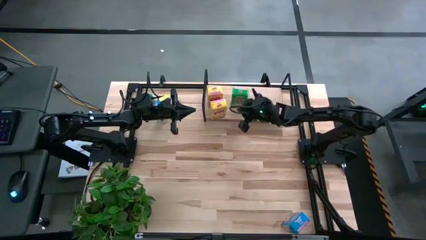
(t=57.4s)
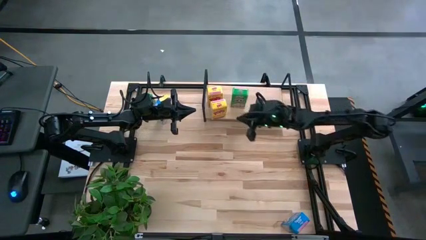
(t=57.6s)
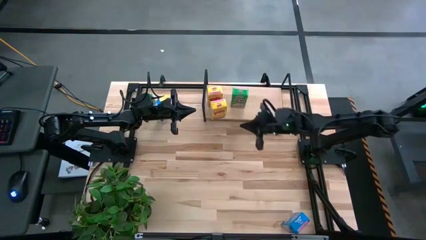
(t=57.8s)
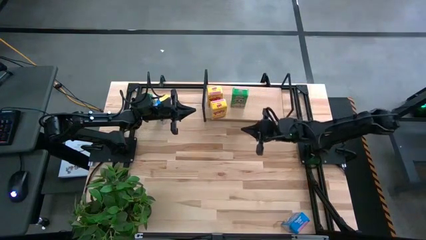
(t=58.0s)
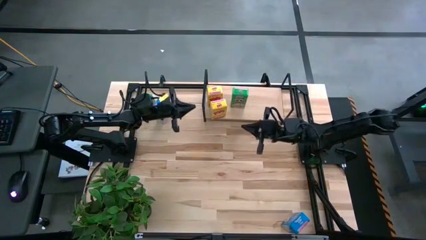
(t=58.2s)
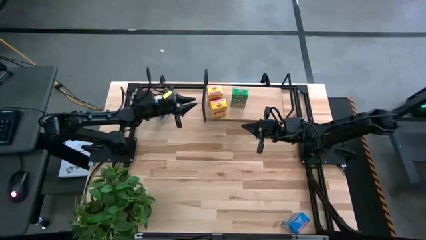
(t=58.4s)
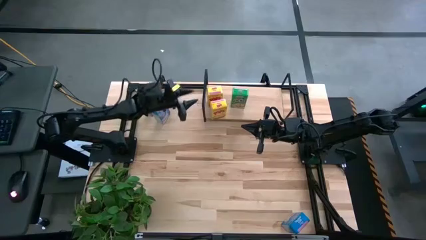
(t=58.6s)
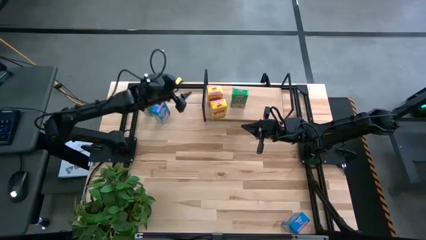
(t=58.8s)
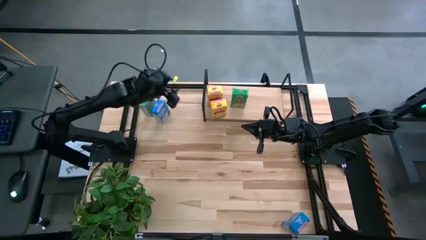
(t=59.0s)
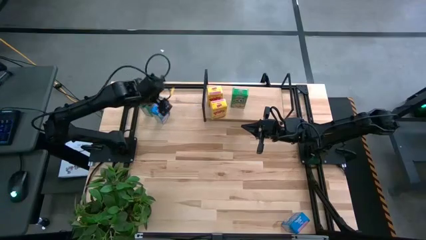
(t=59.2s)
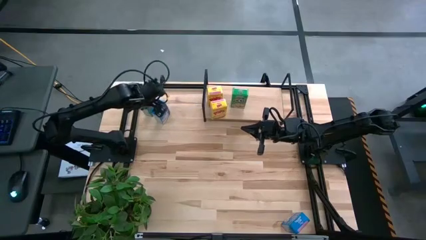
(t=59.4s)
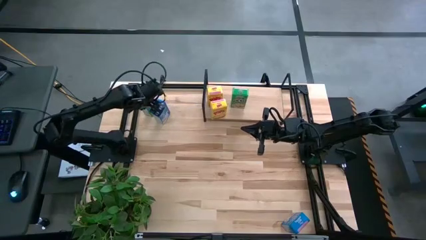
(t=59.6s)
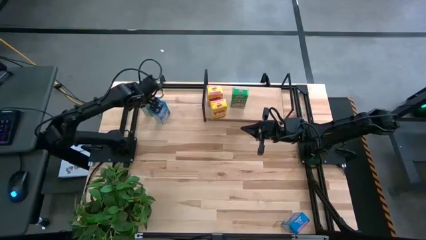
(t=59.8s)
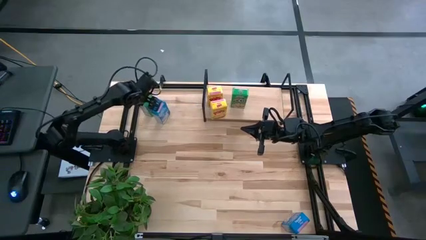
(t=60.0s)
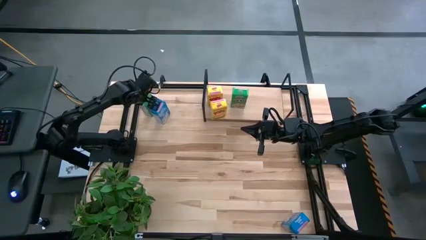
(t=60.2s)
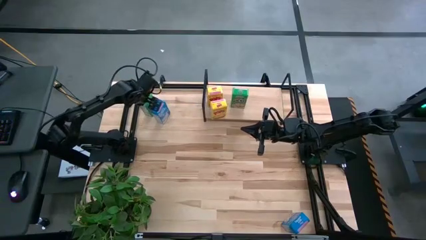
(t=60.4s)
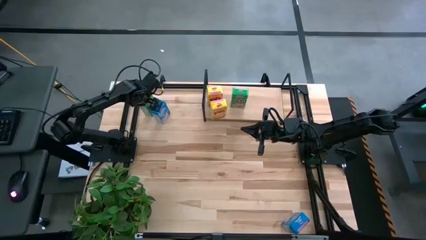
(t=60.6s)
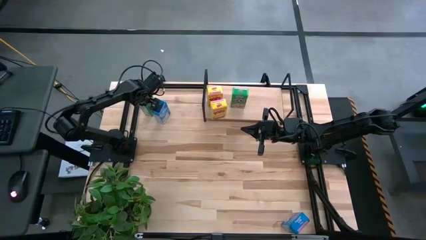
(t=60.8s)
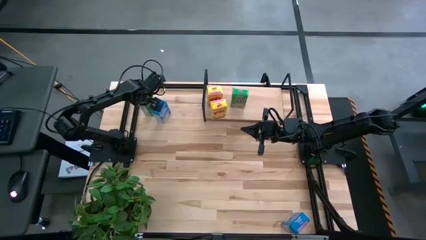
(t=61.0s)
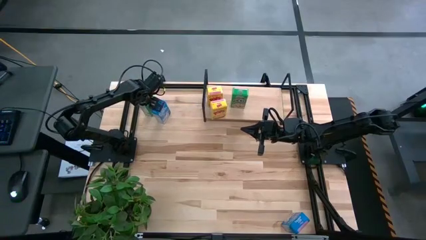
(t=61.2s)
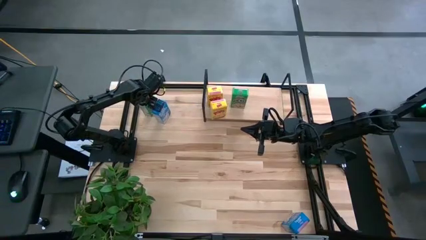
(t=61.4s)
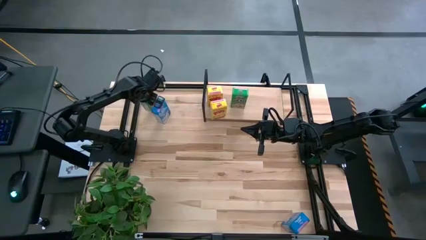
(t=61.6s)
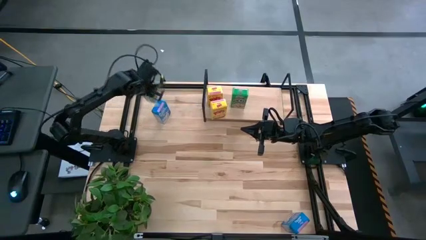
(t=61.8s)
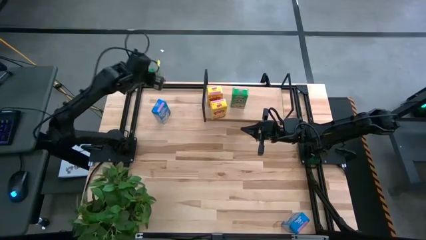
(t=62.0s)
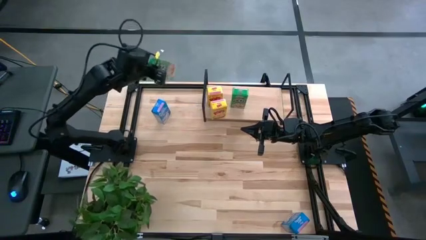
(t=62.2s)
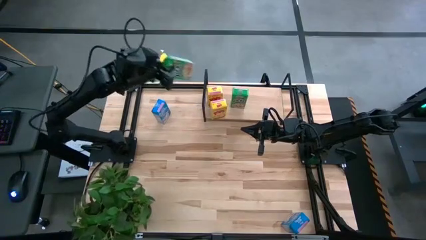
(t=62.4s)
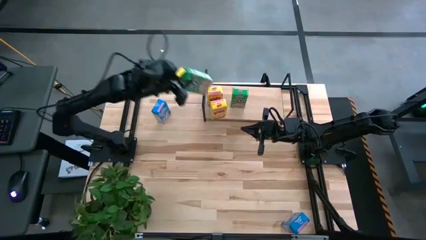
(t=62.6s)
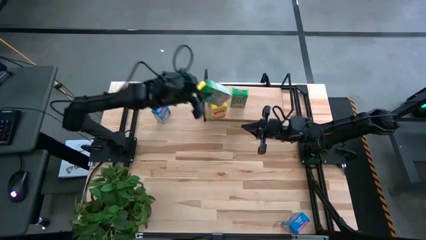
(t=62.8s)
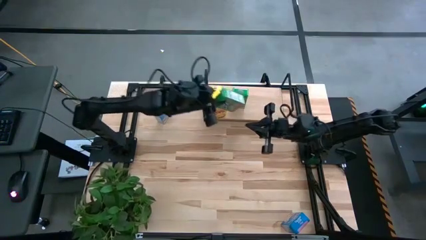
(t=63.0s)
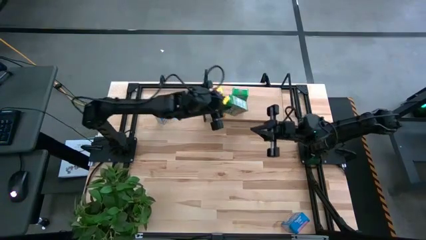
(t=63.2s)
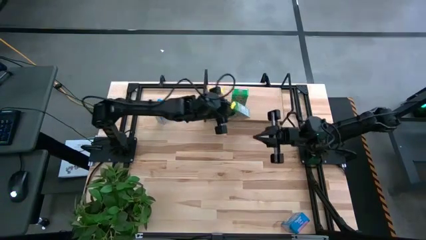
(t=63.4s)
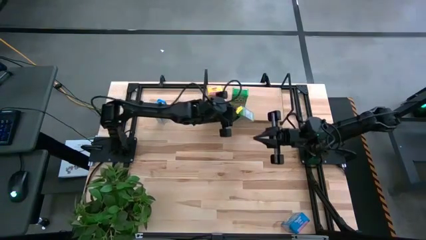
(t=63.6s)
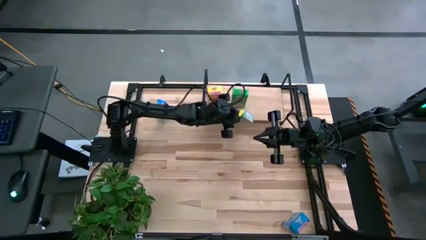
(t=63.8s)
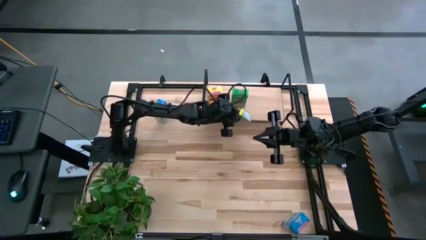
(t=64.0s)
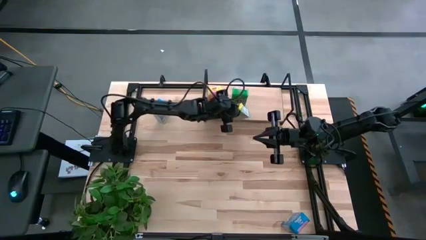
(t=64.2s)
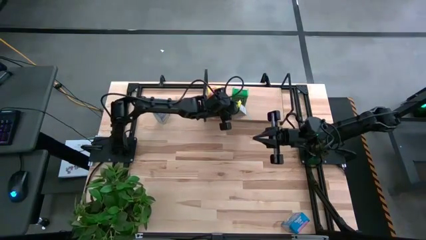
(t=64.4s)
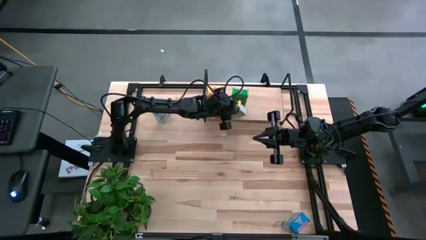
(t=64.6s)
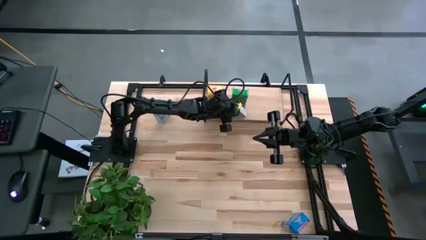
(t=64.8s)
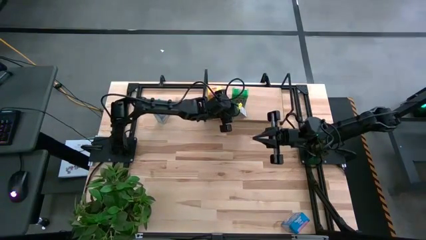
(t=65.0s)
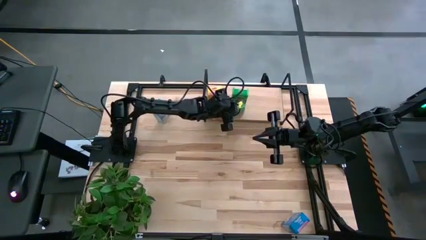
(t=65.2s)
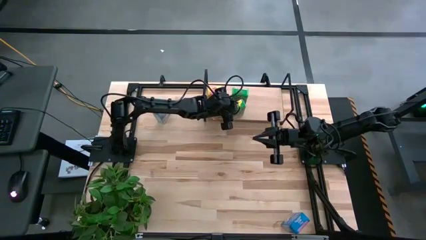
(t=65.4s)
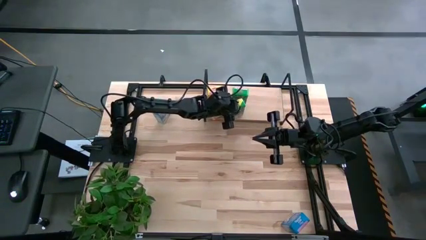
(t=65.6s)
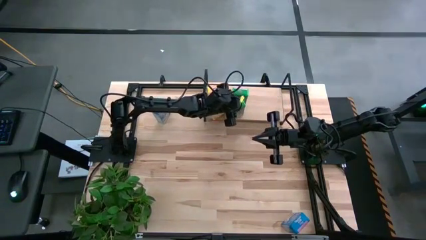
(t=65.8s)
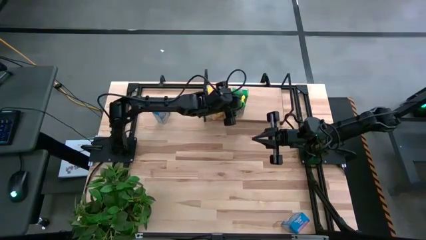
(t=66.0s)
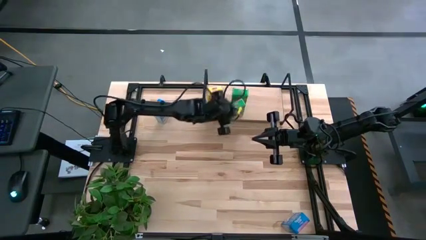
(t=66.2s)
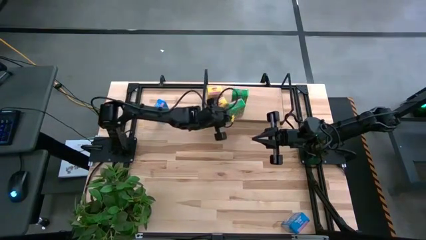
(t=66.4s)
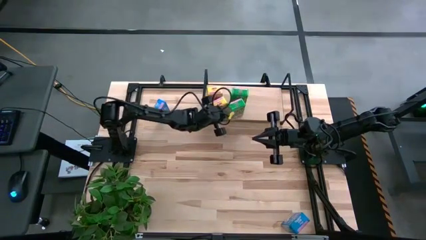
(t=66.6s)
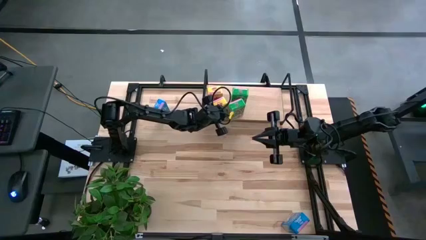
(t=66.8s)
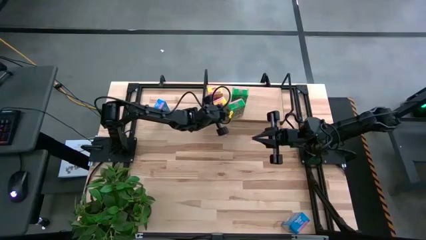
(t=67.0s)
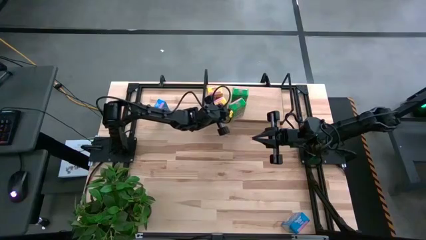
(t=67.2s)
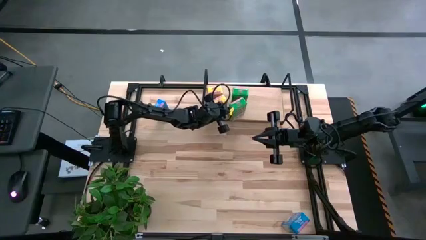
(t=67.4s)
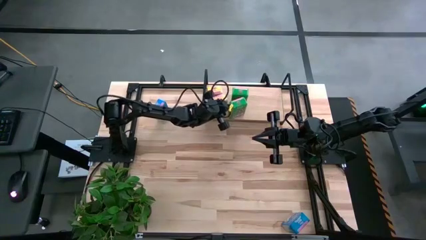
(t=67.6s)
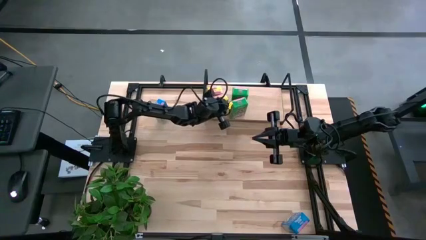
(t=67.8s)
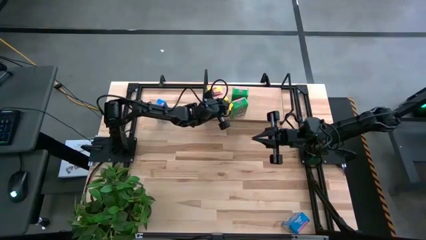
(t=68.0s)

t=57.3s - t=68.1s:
Task: Stack cereal on shelf
Put the green cereal box on the shelf

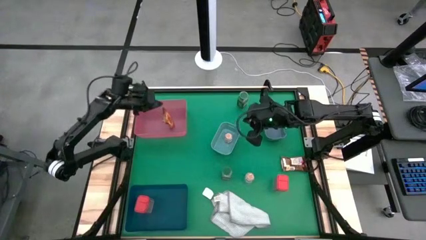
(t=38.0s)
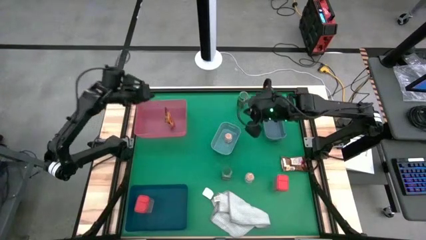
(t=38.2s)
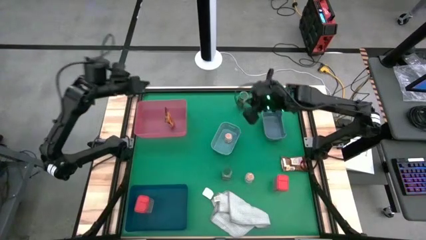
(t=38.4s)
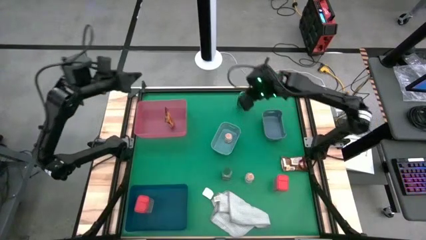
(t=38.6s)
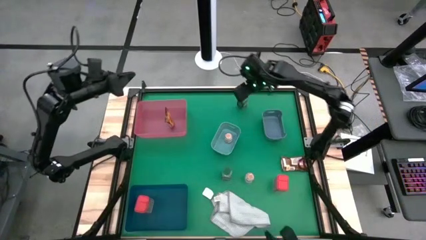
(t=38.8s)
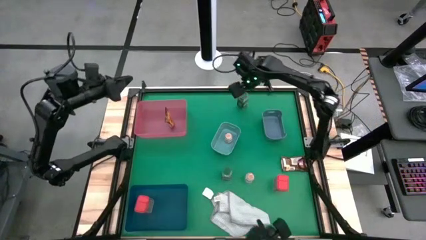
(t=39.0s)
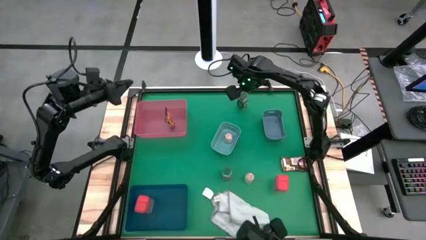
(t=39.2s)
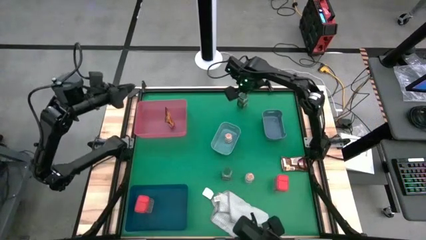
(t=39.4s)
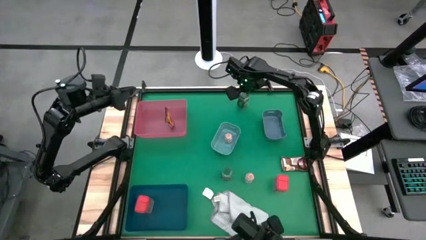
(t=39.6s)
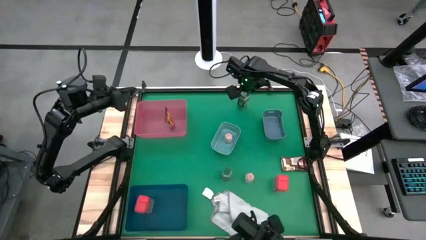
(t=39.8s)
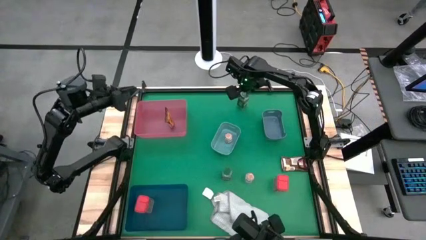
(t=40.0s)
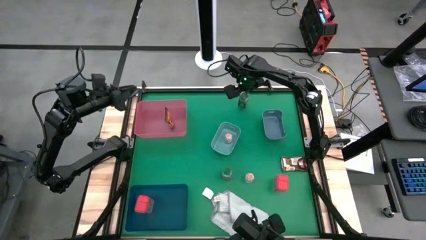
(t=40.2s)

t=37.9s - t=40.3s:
Task: Sort spices by type
Put the top middle green seasoning bottle into the blue bin
